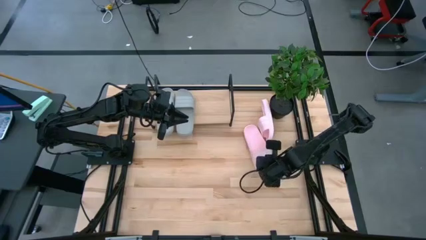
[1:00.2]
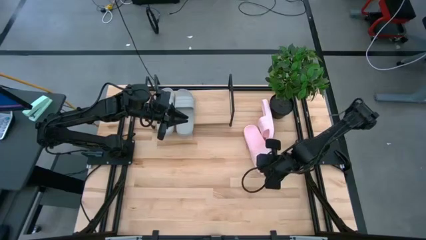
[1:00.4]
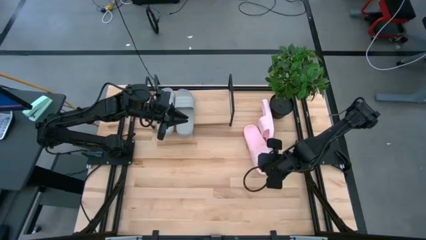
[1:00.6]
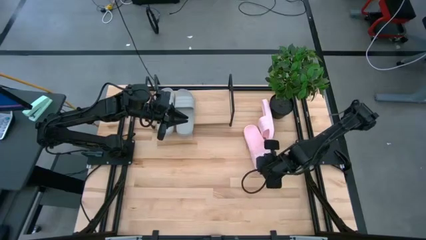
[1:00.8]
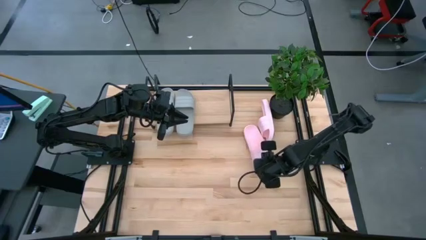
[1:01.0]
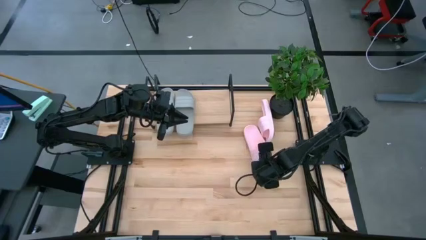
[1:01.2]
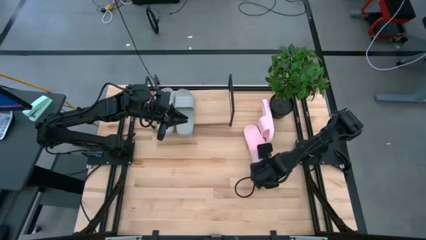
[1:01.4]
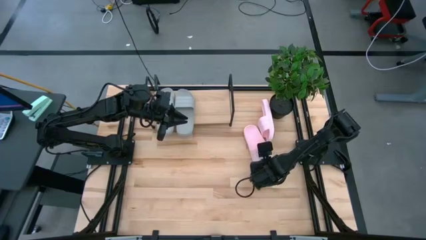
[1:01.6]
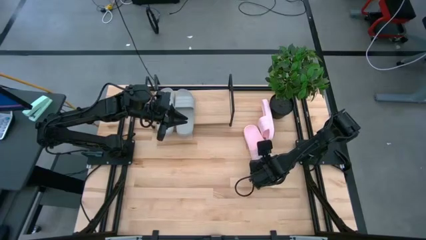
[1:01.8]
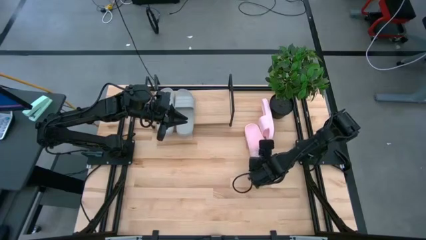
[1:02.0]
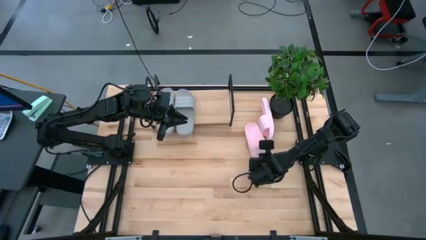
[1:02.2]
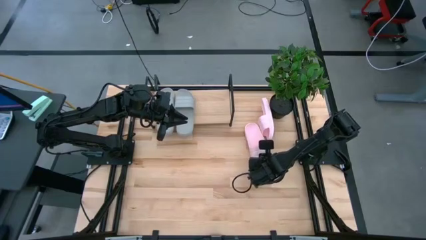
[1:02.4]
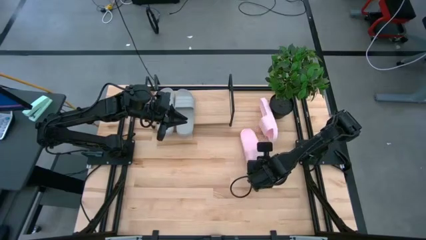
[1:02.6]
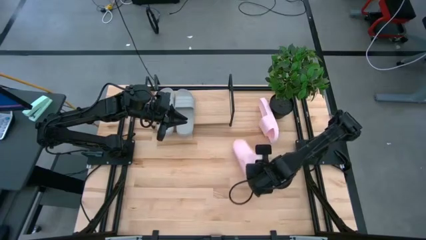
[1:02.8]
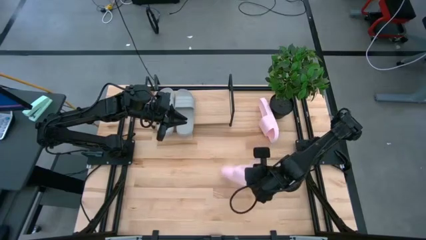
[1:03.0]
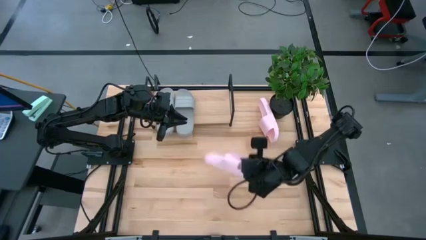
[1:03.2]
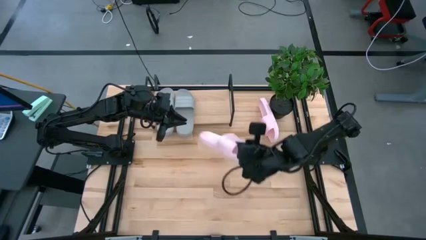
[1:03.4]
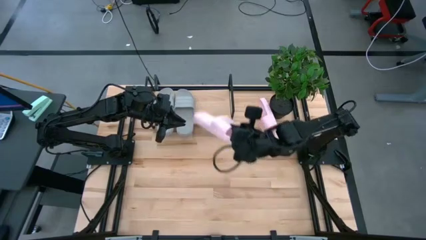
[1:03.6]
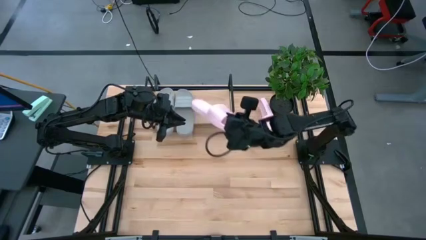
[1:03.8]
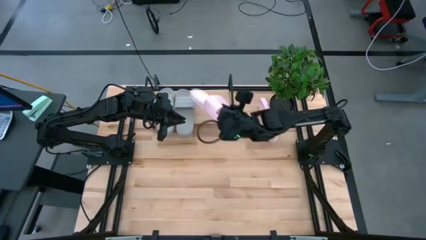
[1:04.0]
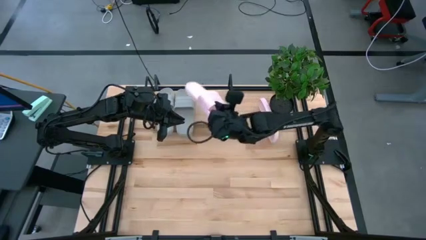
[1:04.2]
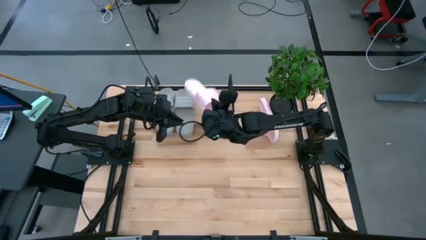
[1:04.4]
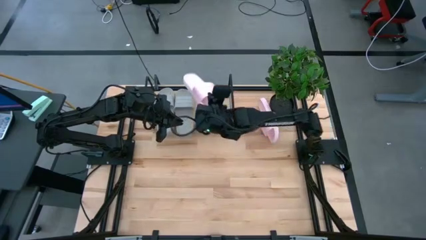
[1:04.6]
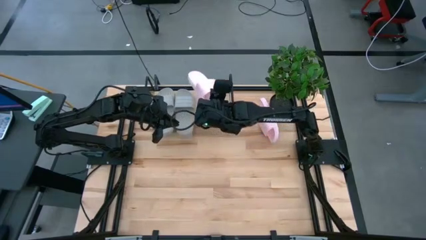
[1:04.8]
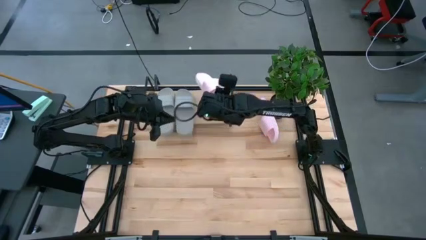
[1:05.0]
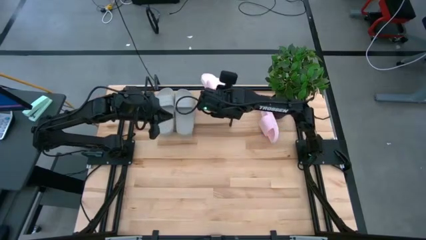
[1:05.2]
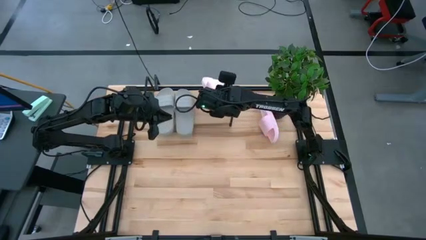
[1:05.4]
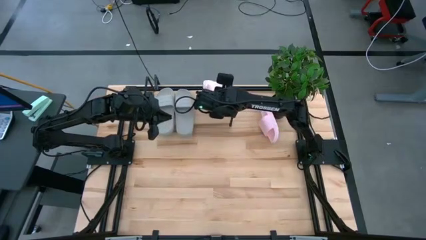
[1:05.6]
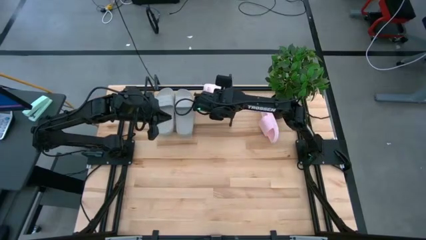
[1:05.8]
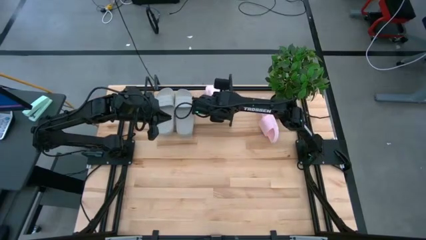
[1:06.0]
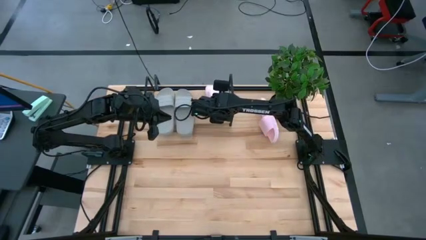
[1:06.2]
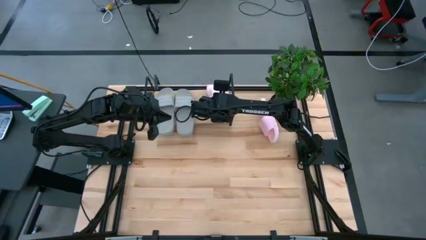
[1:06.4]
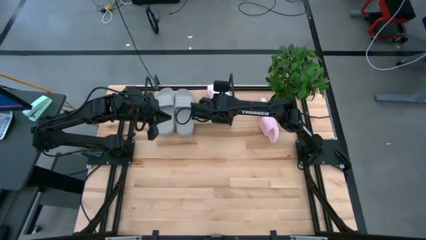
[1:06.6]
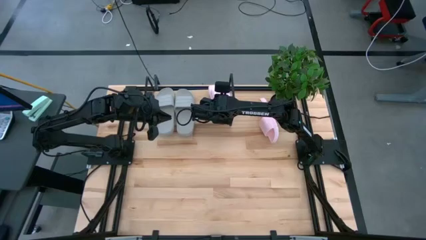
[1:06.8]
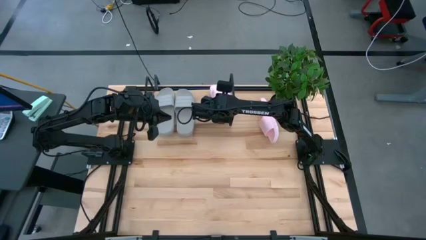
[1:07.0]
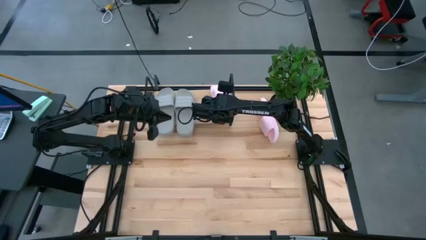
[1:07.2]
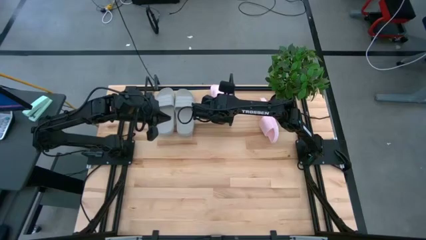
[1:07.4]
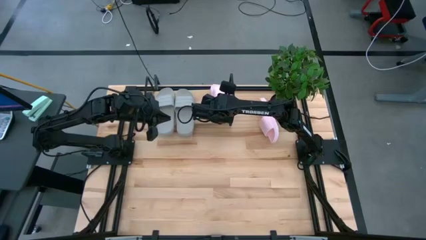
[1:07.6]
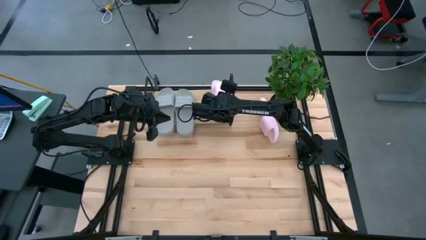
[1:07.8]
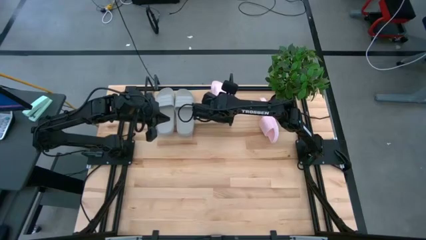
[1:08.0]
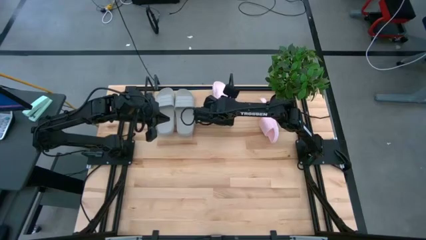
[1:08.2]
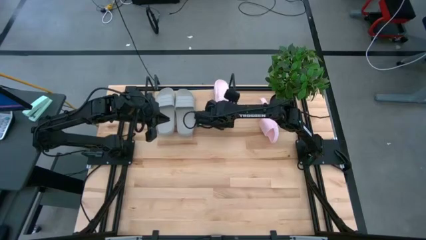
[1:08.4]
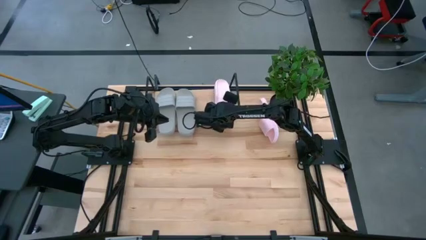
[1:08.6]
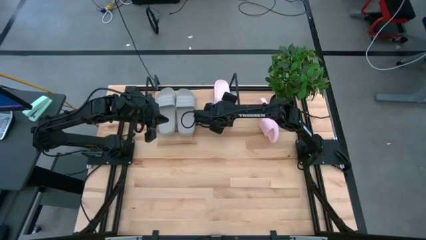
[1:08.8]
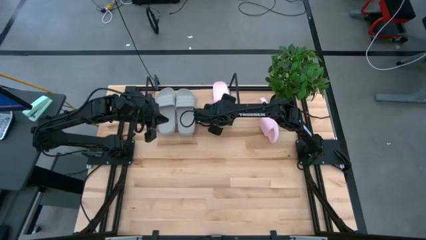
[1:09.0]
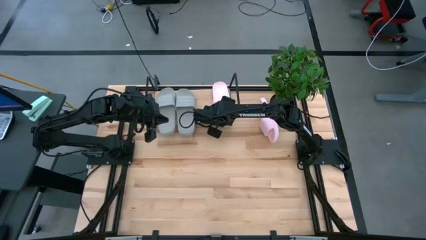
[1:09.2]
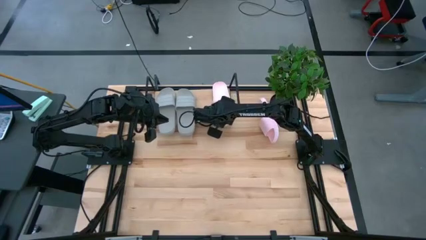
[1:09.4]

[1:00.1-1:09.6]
Task: Pick and place slides into the shelf
Put the bottom pink slipper on the shelf

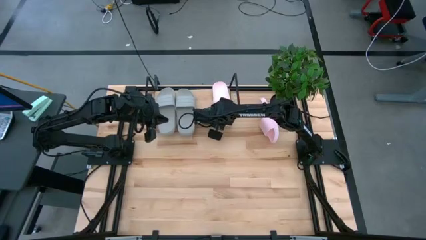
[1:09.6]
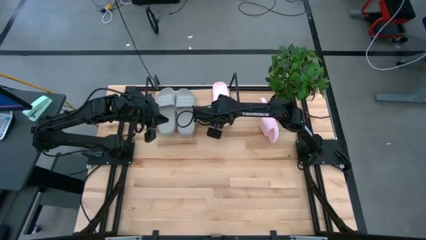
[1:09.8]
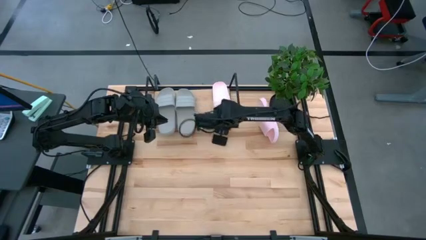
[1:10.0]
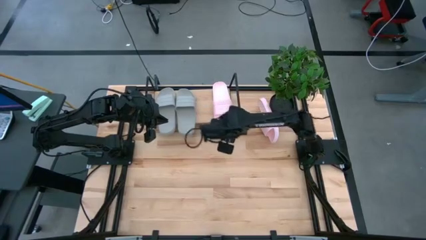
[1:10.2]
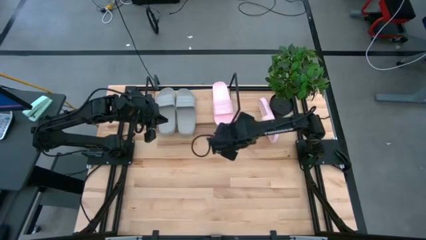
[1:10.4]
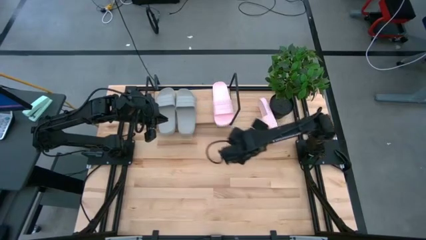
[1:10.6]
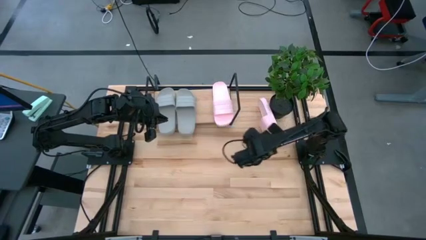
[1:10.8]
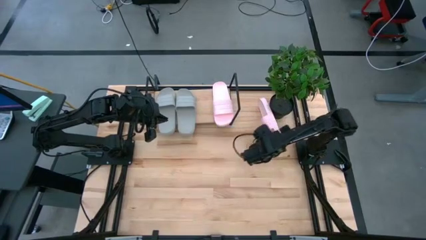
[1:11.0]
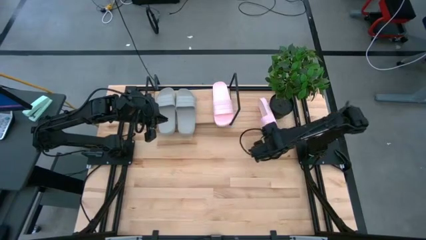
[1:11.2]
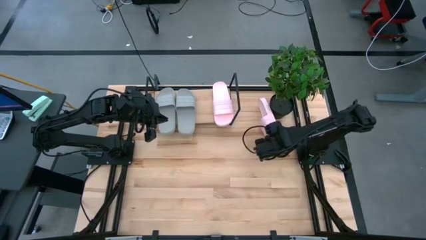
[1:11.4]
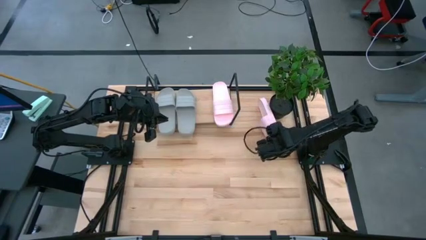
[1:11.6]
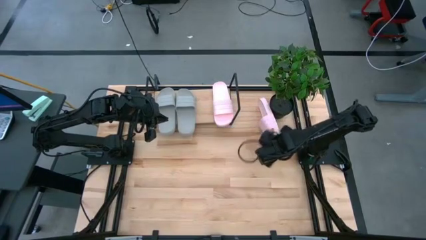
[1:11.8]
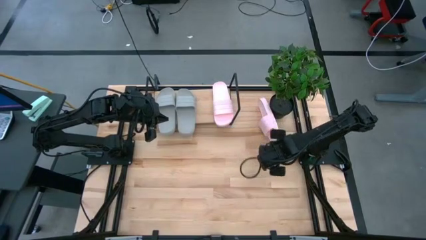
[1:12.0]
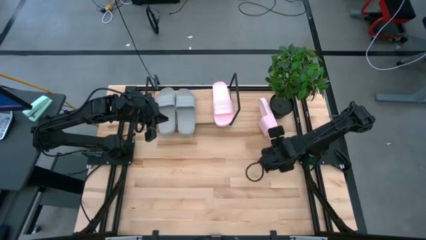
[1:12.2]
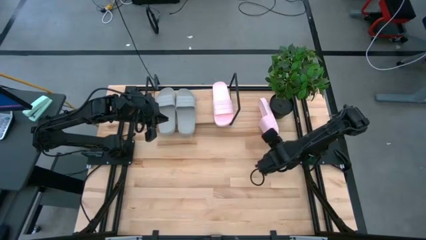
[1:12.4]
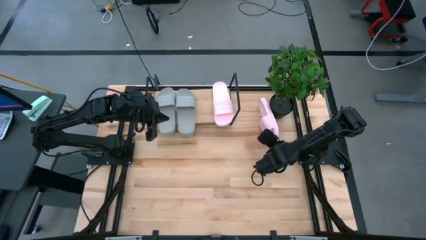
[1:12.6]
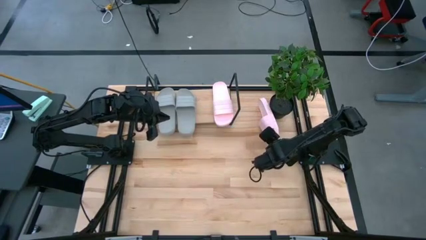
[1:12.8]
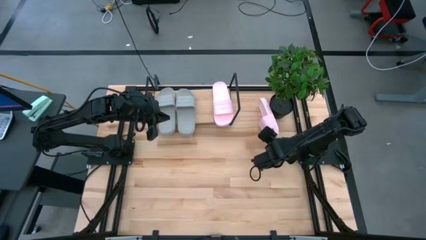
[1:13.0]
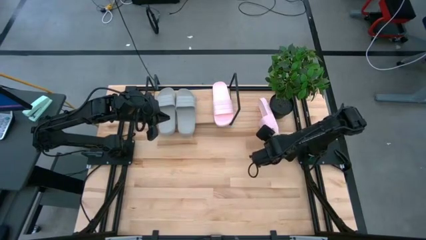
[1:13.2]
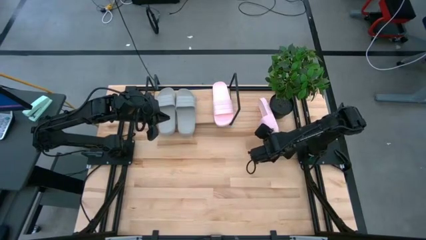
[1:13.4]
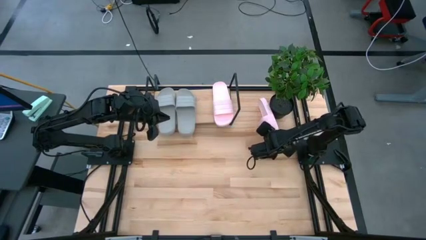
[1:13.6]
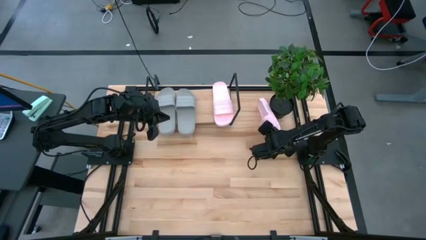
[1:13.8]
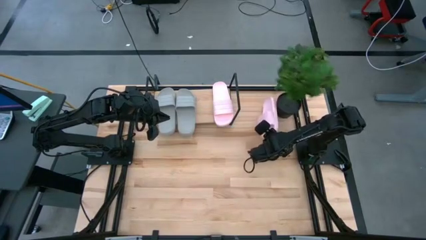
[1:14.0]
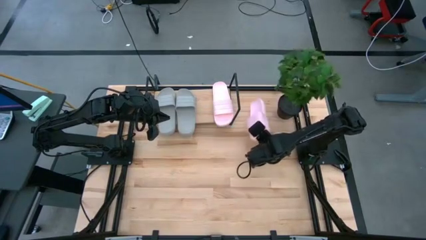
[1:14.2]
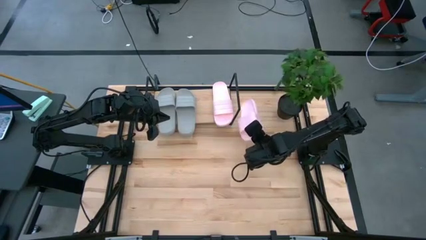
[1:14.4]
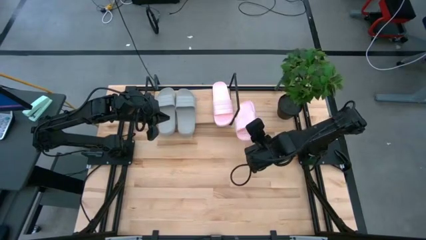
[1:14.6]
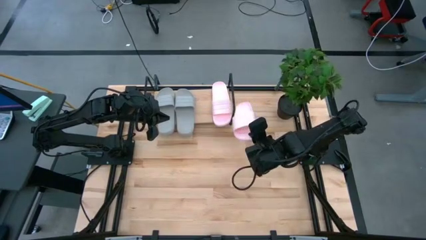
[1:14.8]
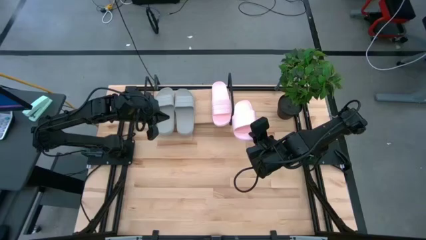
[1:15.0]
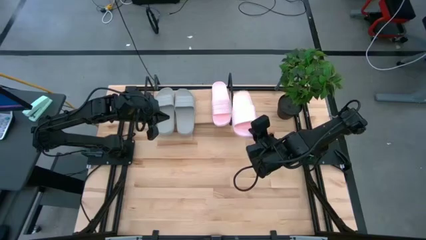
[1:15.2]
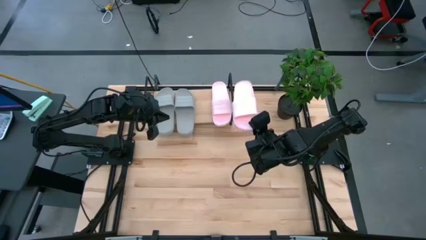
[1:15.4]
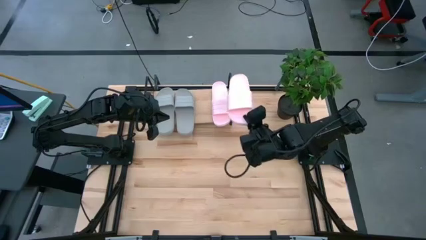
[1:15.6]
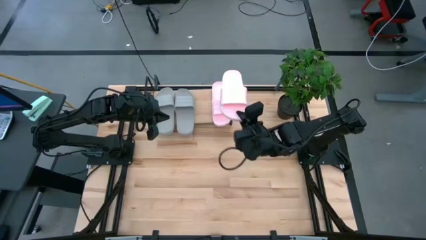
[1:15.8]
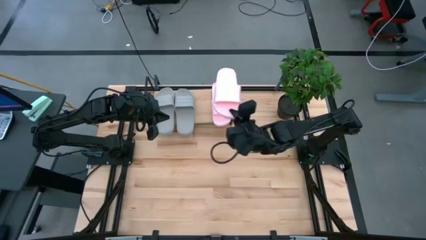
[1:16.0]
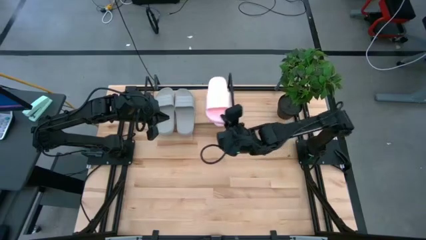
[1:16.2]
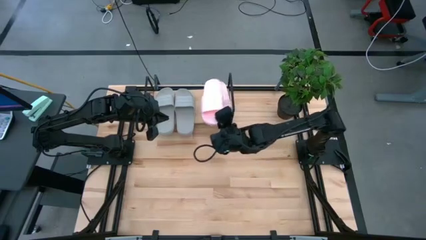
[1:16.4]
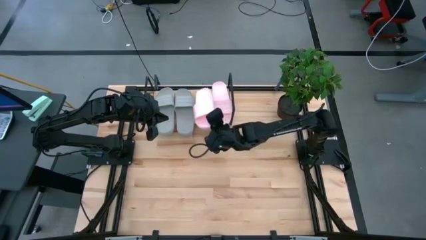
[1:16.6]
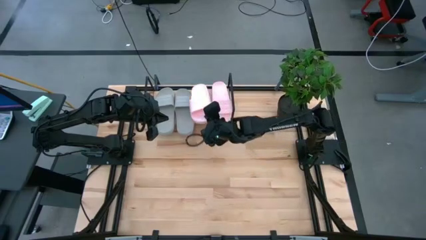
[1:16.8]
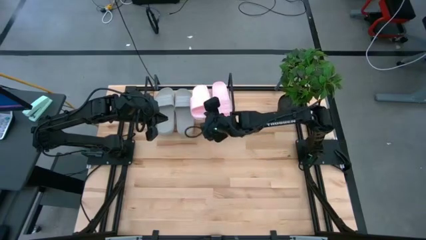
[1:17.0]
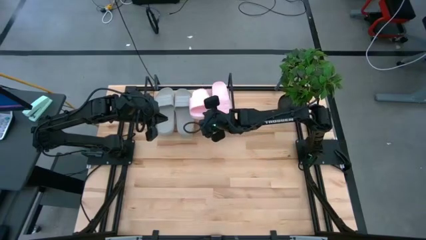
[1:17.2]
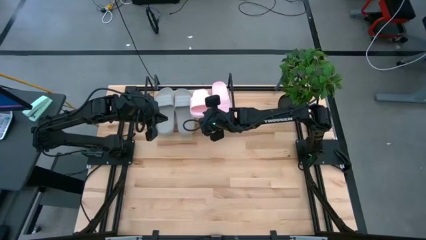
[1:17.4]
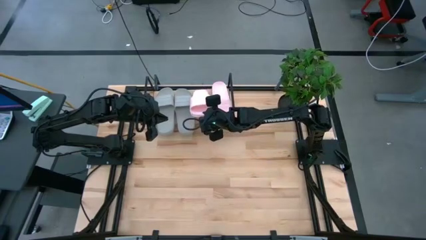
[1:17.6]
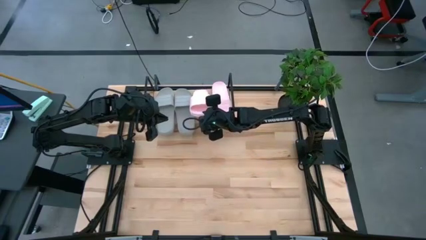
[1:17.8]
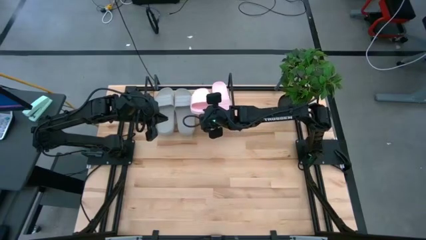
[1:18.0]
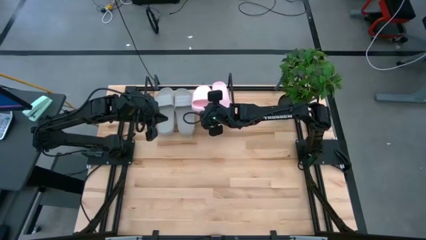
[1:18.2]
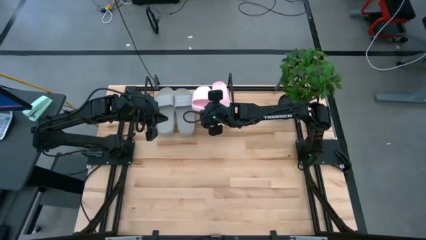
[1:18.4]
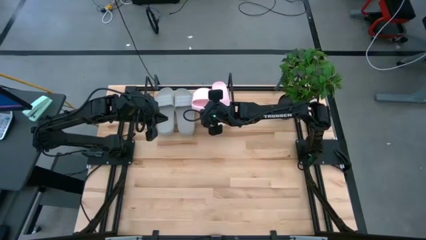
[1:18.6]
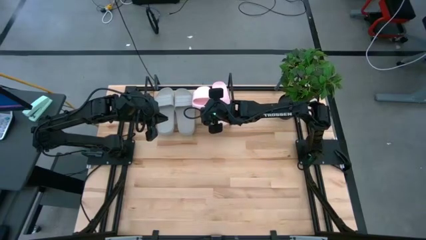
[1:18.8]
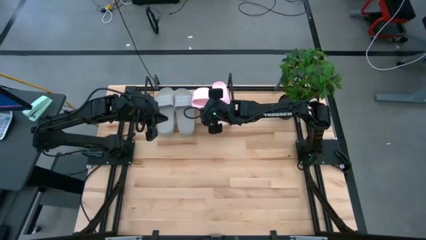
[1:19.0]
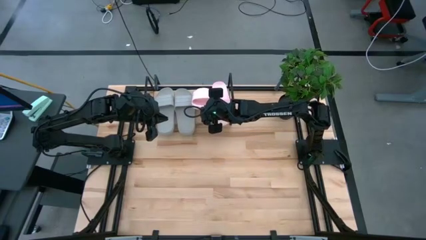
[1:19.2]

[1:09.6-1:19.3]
Put the pink slipper on the shelf
